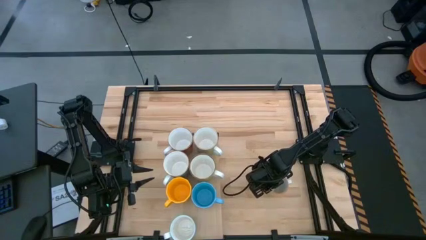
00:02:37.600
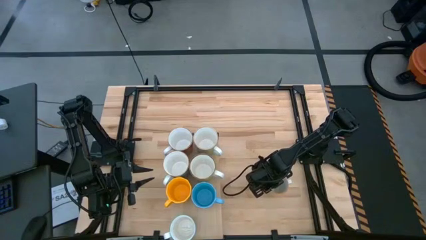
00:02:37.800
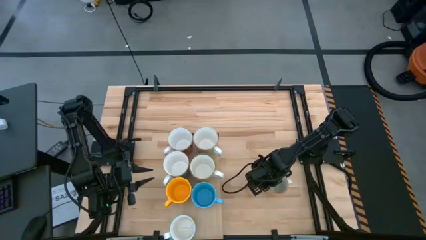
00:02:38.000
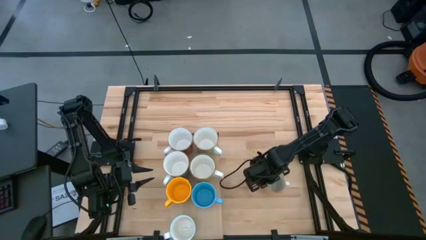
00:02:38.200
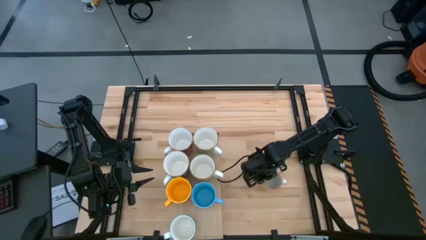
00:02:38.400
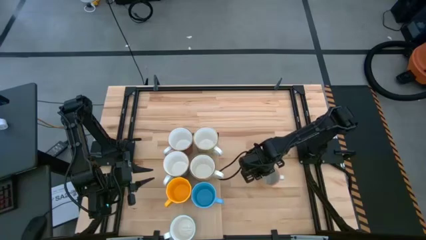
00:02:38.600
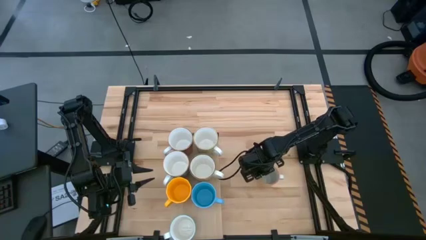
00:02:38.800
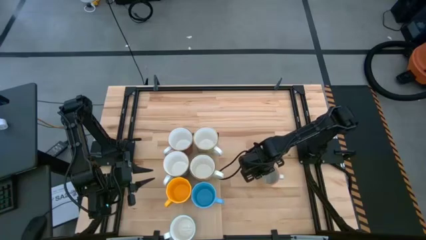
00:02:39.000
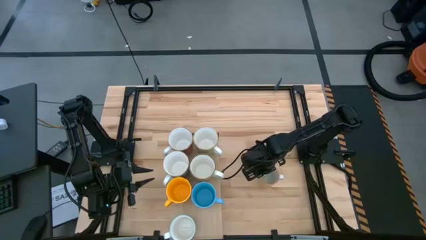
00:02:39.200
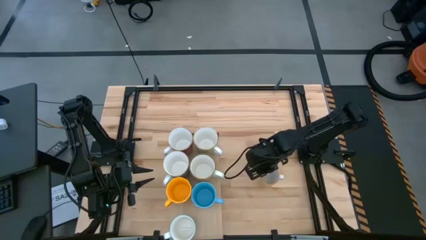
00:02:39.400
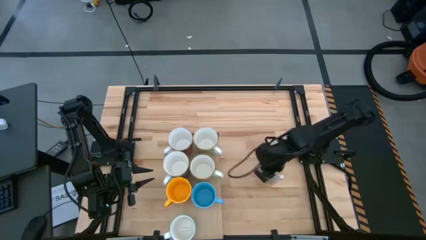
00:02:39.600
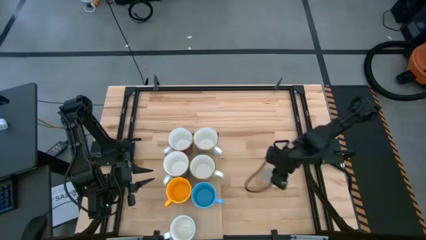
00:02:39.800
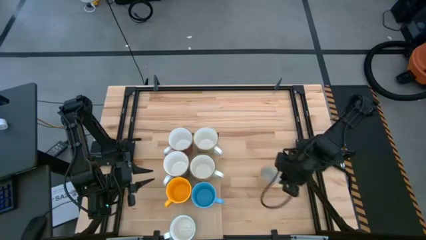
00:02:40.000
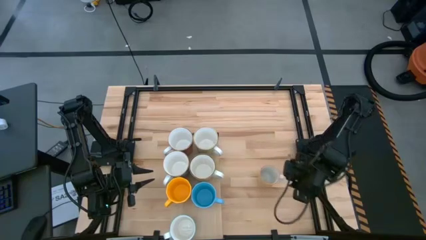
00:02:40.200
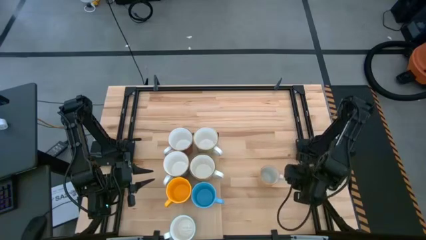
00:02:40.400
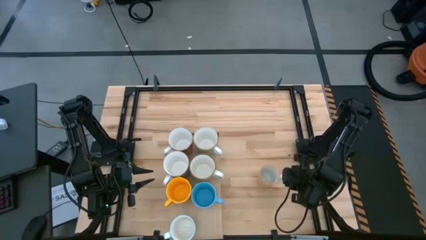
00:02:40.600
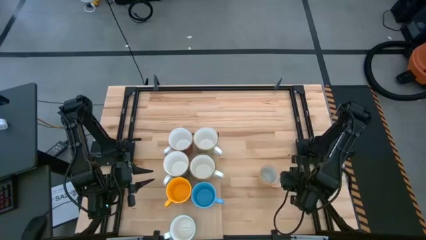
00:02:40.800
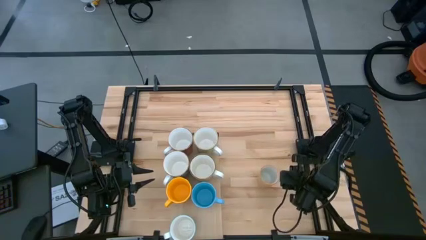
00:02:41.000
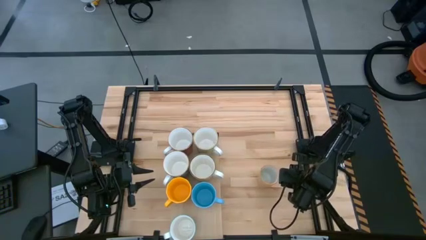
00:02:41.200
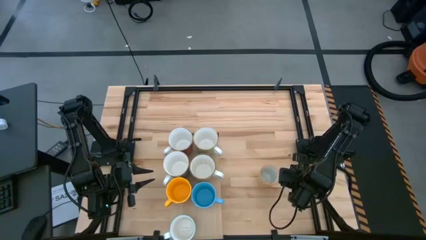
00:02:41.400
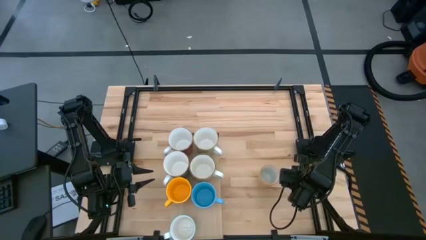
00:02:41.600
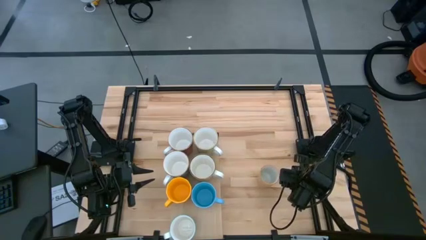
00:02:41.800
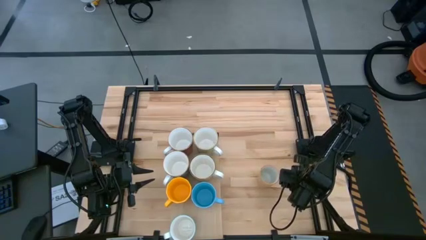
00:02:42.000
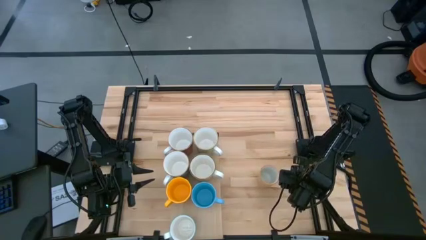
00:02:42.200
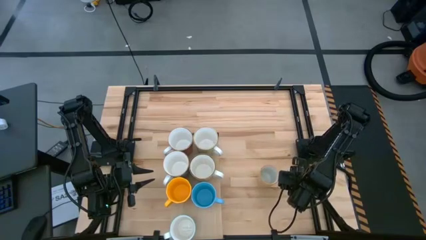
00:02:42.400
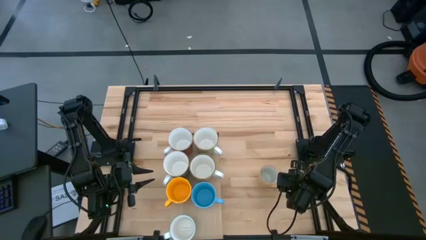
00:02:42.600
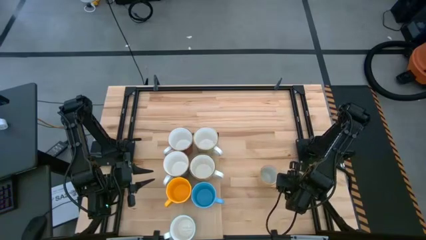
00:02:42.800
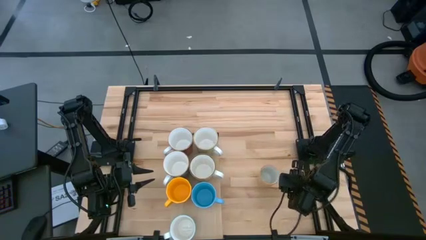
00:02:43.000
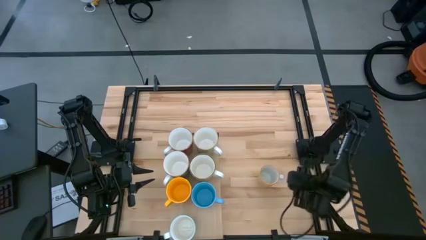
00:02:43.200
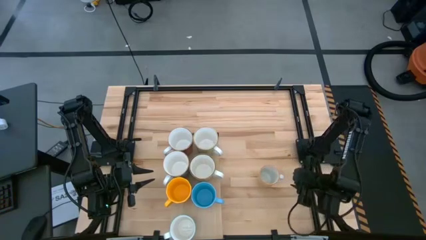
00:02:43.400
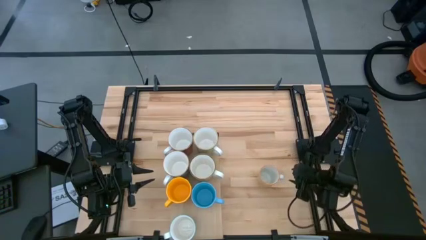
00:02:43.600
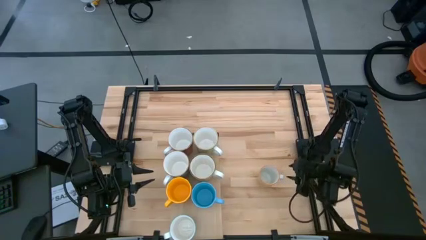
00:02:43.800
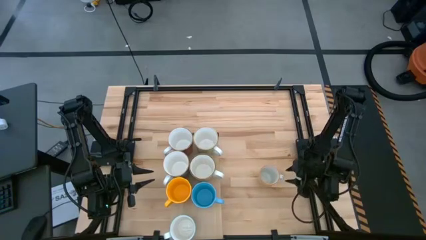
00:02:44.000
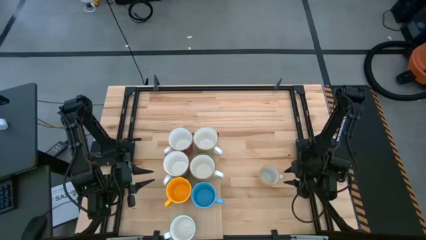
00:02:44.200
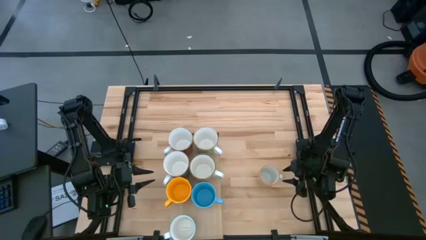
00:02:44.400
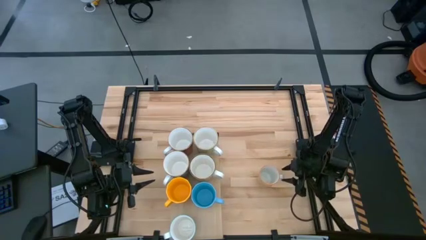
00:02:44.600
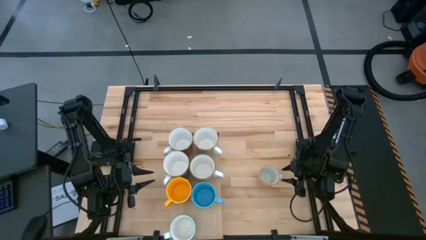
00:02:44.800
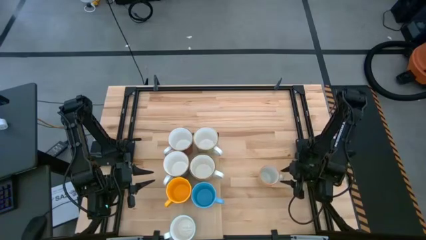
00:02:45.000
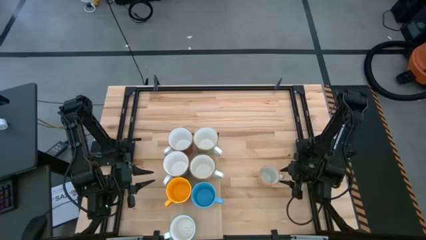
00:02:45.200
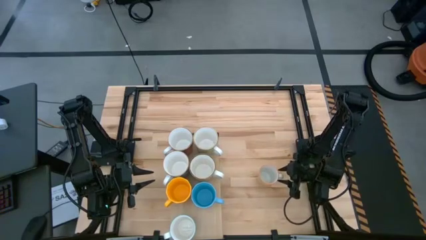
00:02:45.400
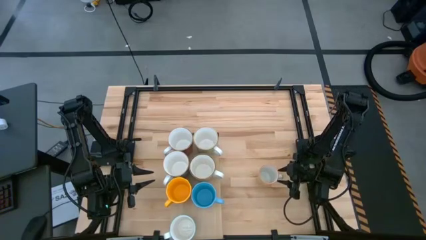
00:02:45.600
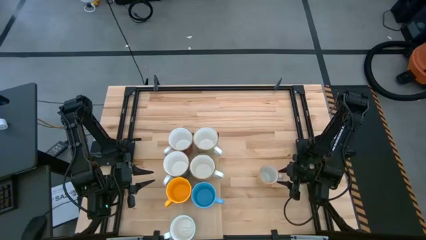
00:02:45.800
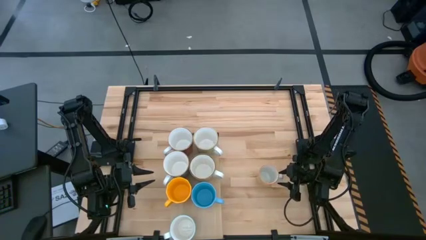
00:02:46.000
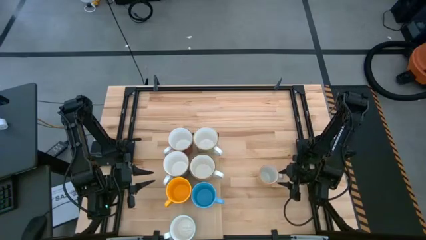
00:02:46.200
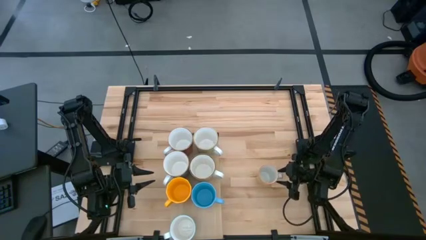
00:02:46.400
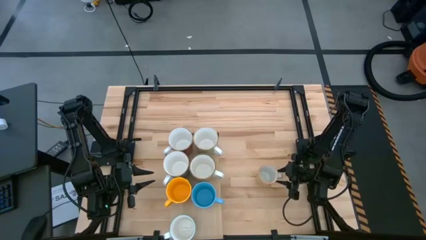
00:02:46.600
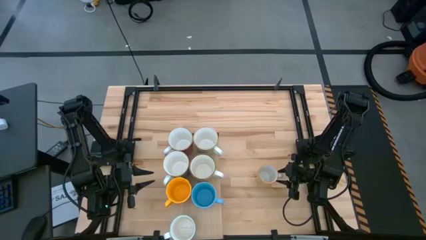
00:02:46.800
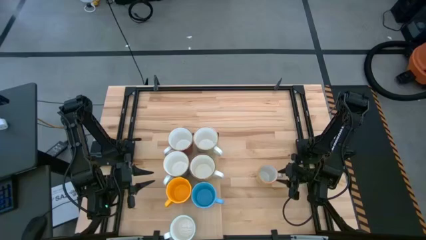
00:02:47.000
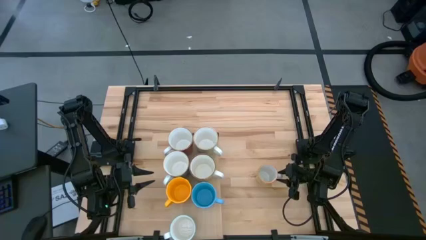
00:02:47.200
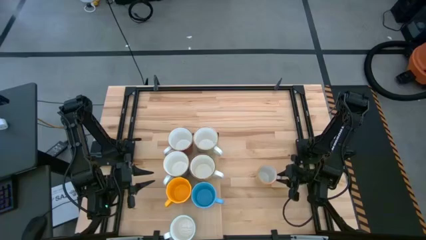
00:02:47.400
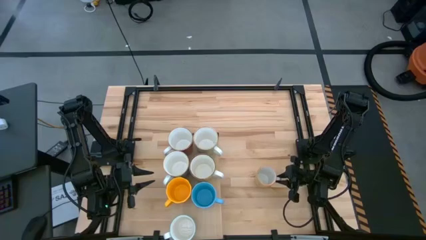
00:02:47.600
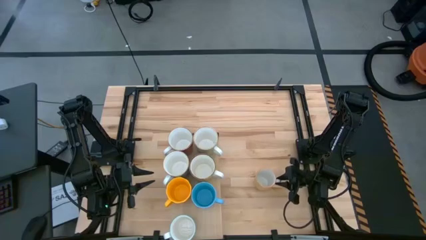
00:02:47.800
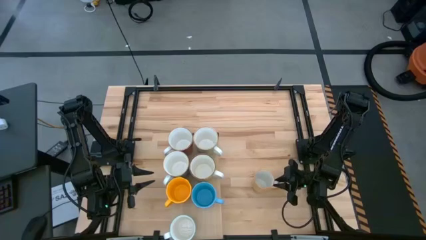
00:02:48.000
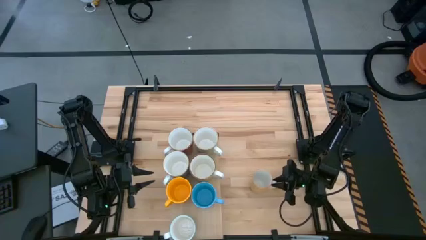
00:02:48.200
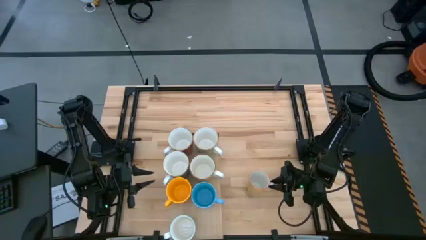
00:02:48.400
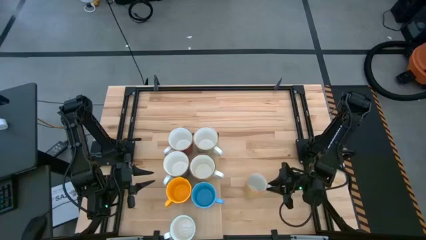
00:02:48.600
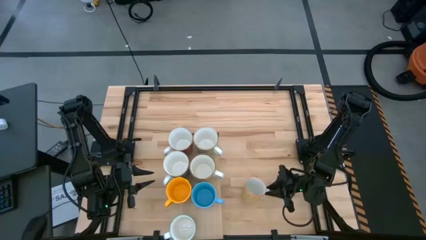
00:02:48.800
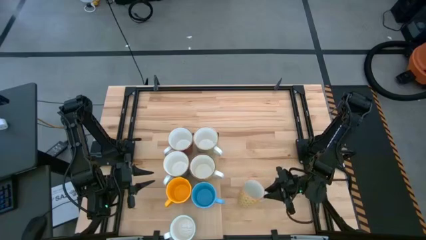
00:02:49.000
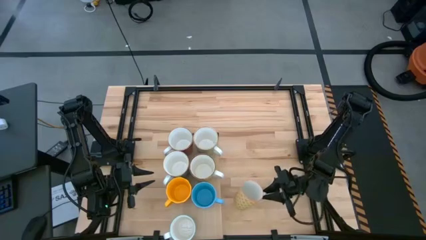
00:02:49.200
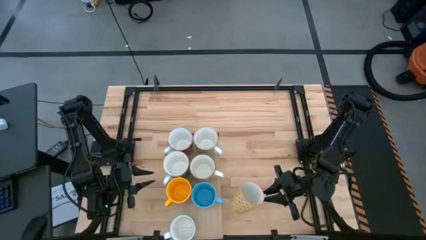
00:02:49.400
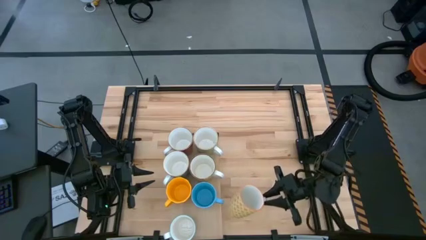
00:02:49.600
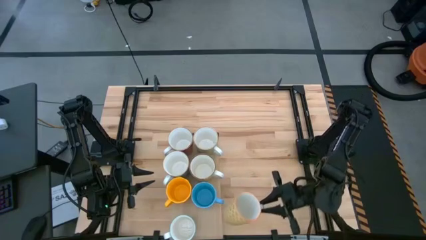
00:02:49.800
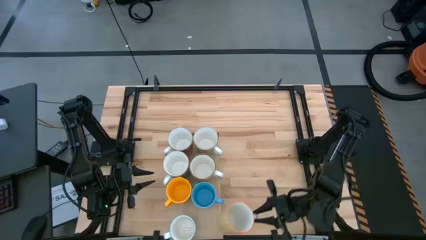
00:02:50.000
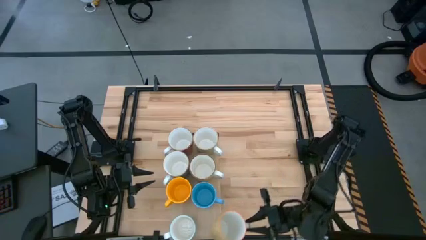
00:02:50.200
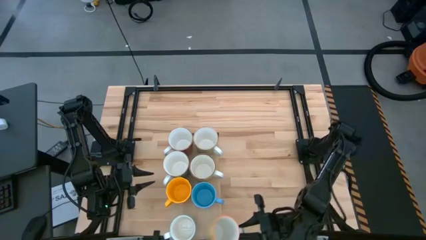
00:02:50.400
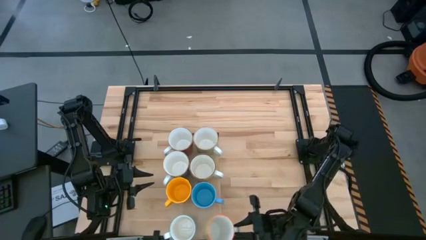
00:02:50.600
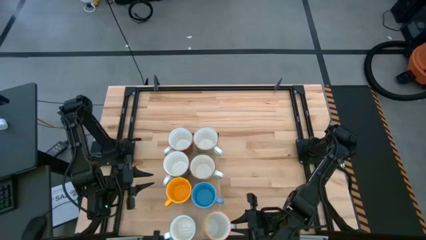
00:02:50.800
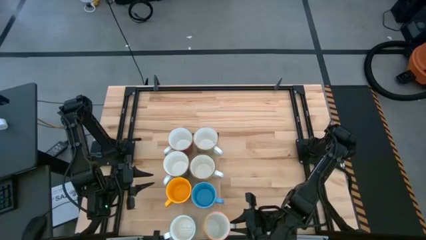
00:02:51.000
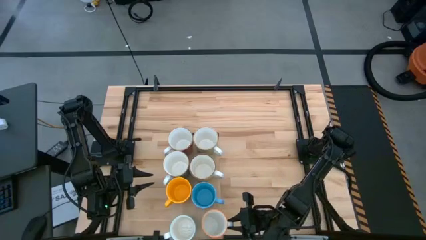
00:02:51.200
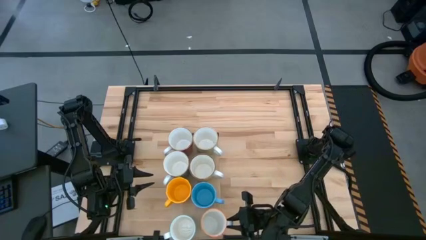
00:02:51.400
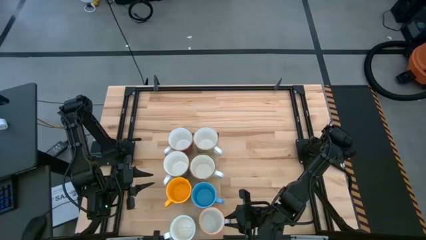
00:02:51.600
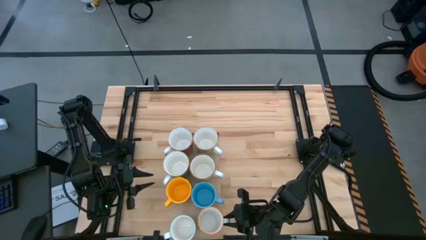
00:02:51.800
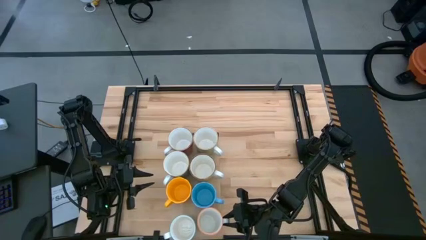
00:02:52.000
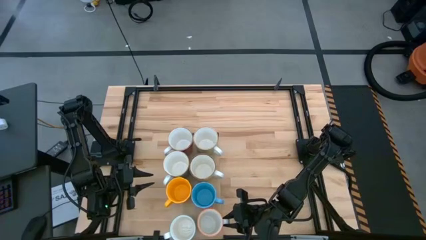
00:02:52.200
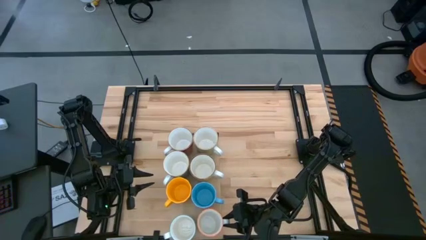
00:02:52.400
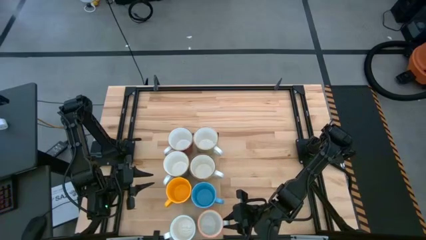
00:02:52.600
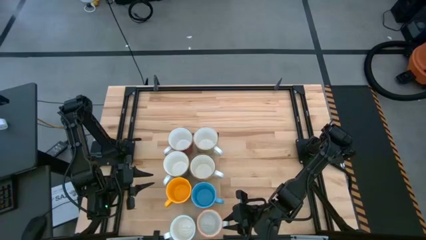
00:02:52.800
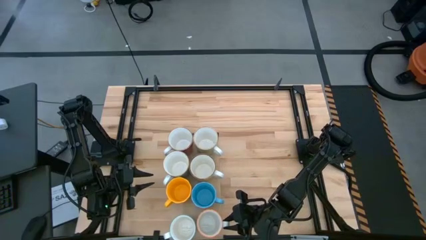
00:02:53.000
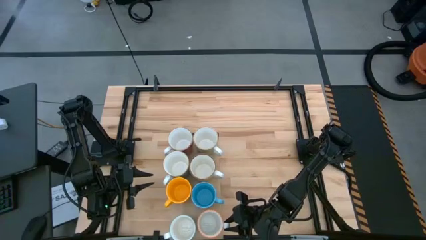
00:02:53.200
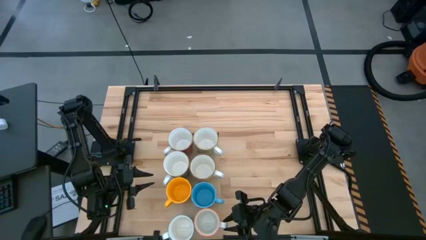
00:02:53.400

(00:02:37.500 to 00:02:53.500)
Task: Place coffee mugs
Put the yellow mug on the shelf aligned with the blue mug
